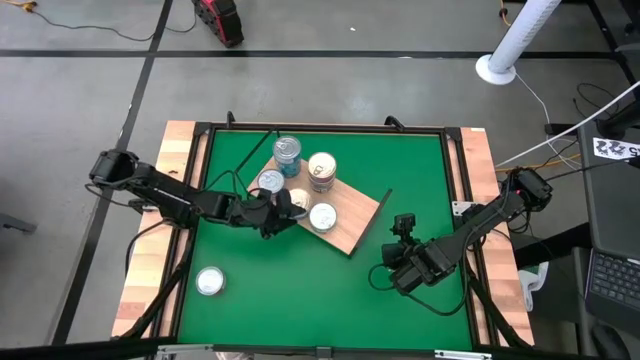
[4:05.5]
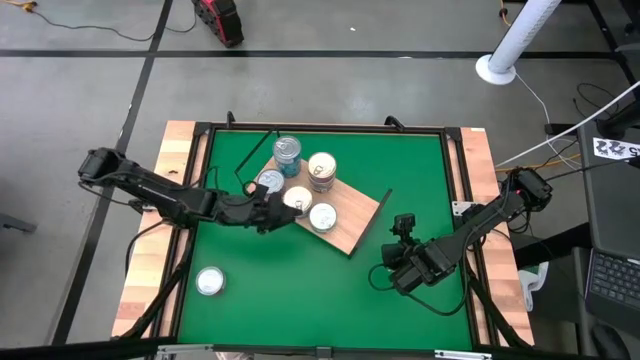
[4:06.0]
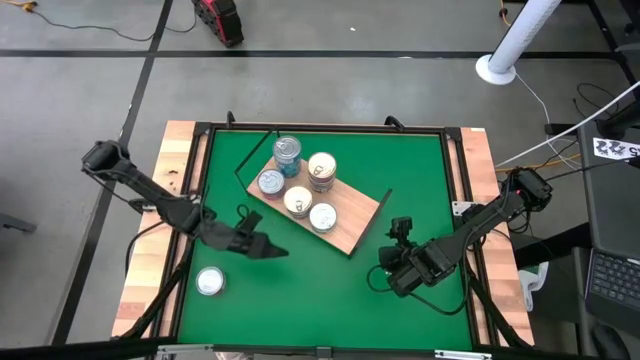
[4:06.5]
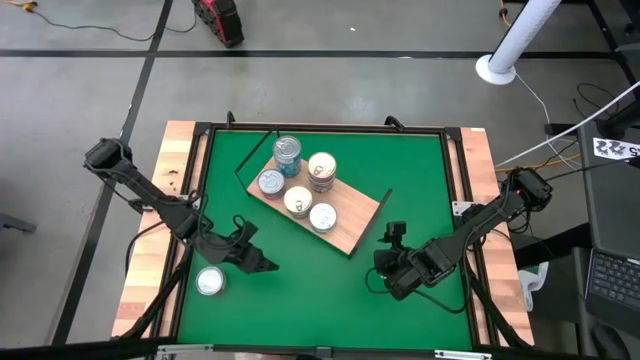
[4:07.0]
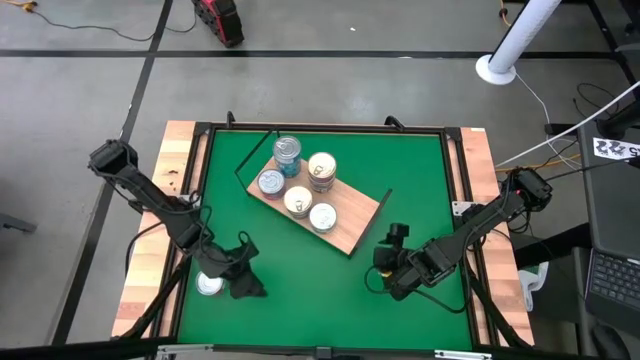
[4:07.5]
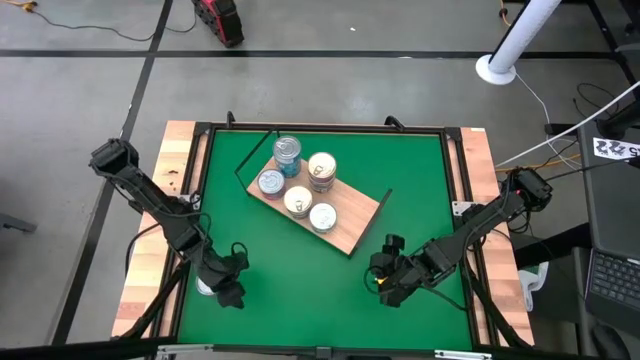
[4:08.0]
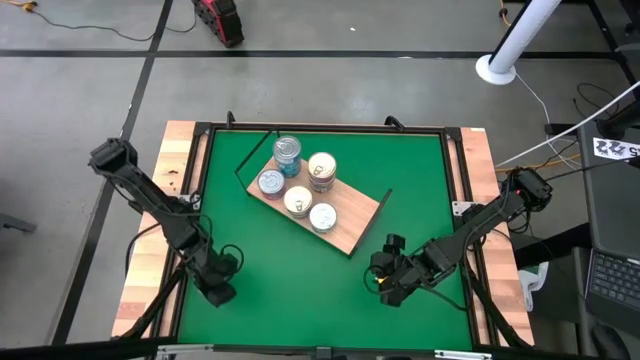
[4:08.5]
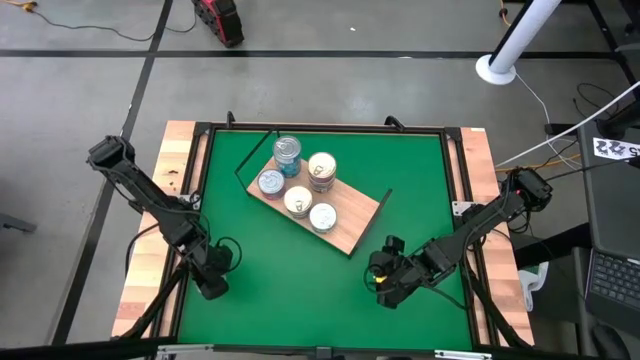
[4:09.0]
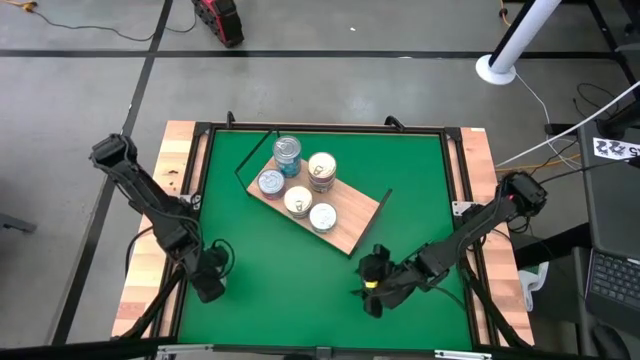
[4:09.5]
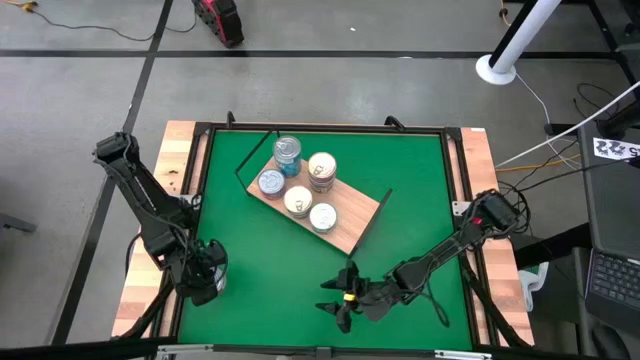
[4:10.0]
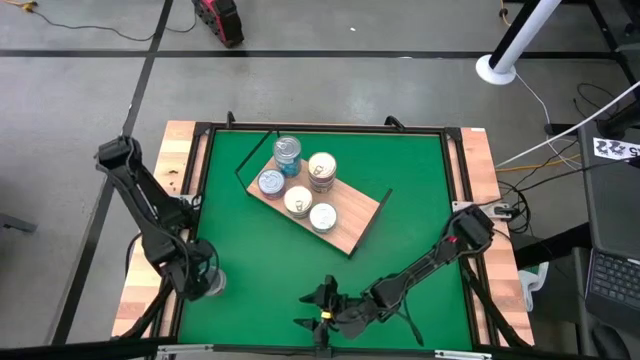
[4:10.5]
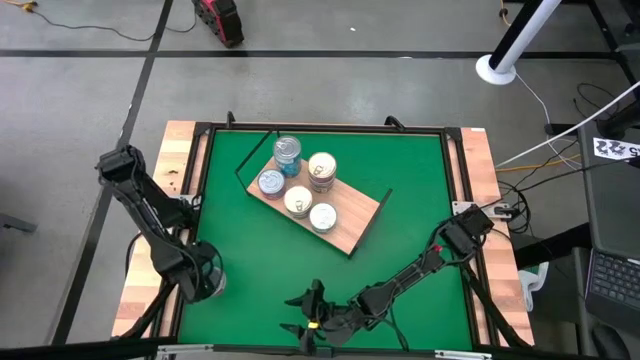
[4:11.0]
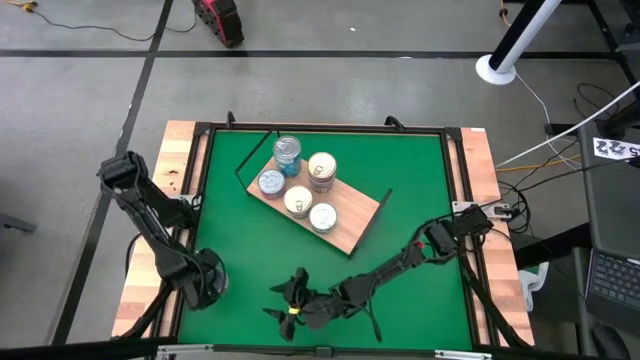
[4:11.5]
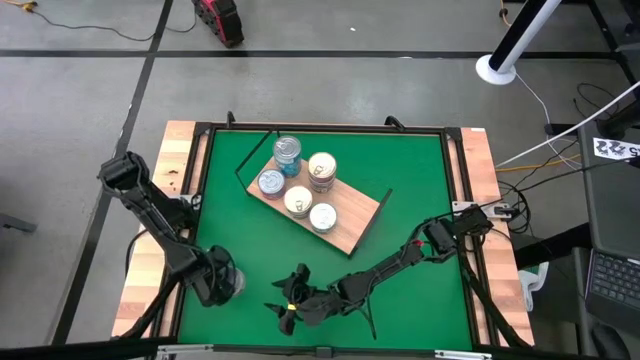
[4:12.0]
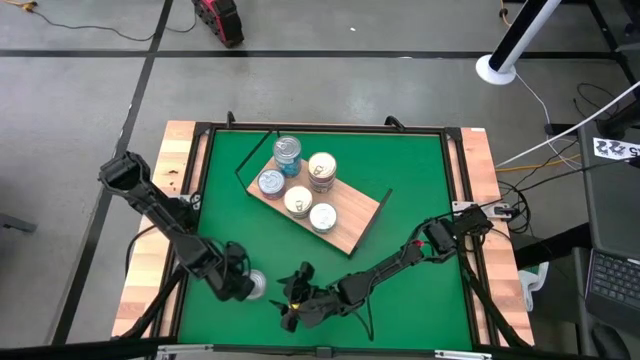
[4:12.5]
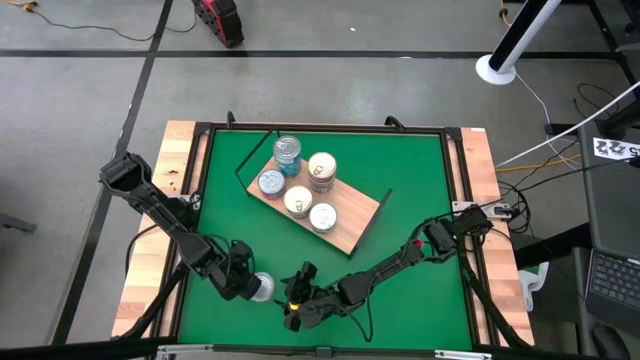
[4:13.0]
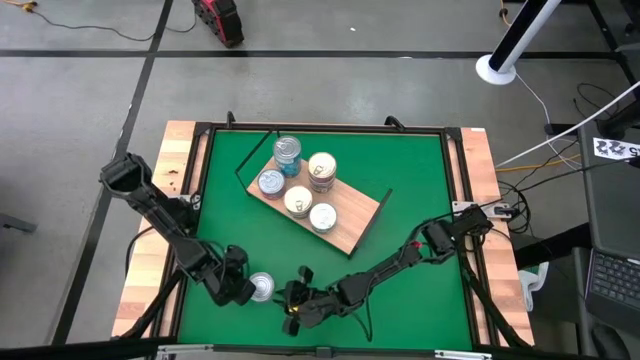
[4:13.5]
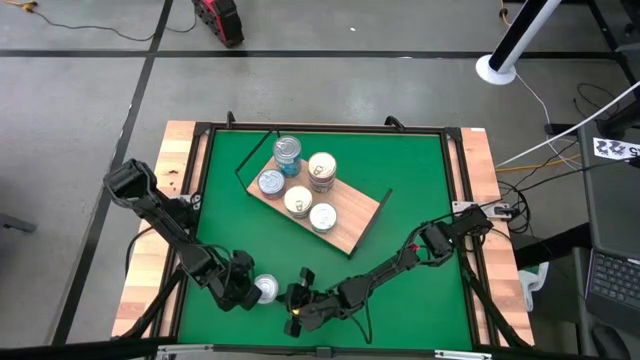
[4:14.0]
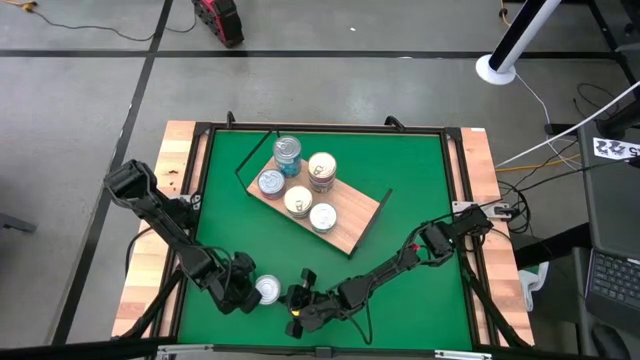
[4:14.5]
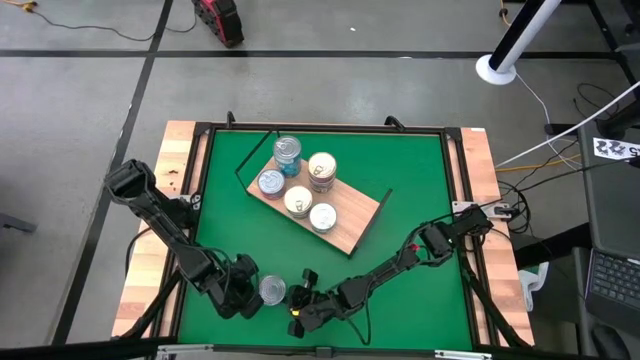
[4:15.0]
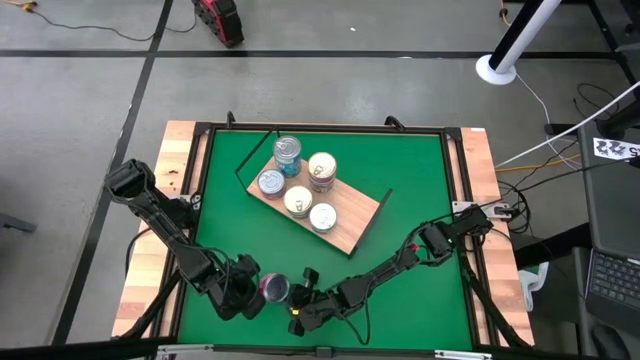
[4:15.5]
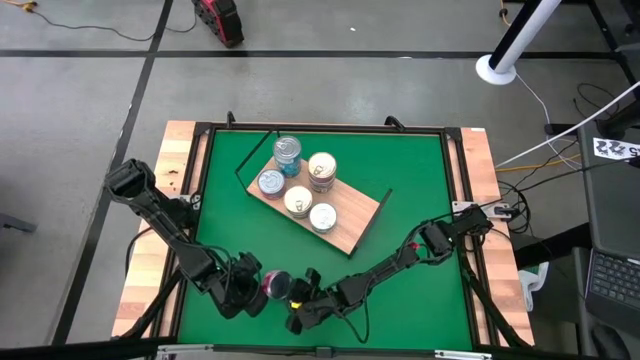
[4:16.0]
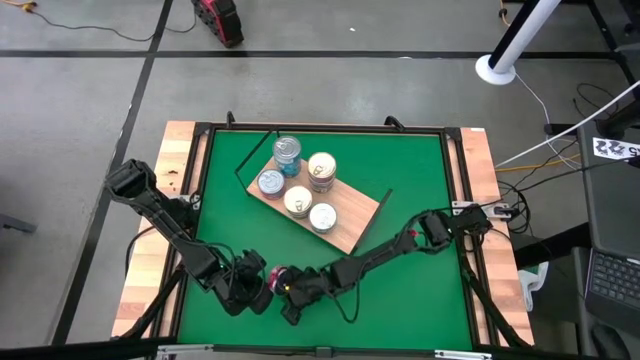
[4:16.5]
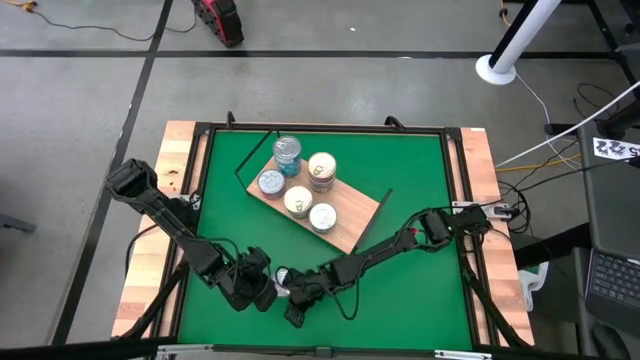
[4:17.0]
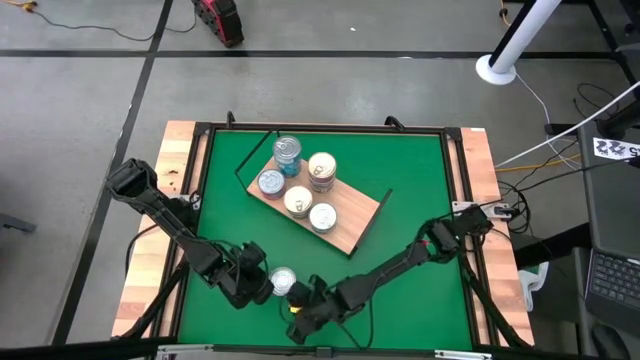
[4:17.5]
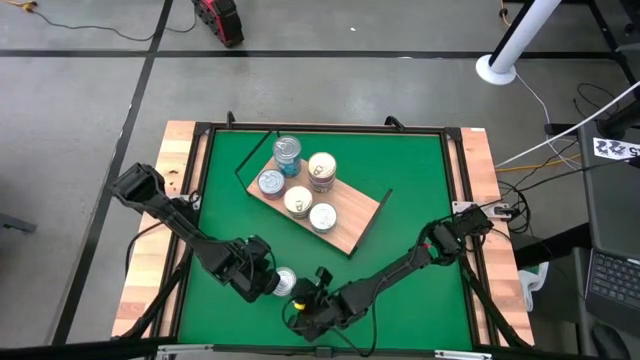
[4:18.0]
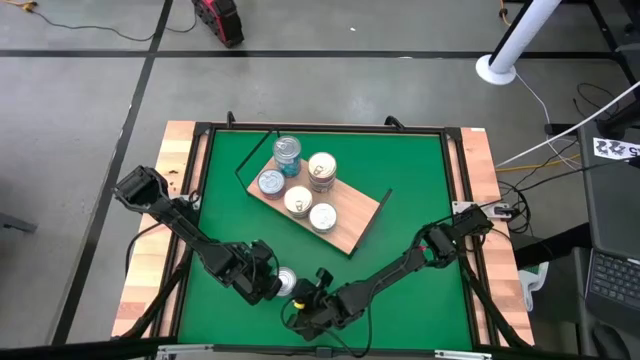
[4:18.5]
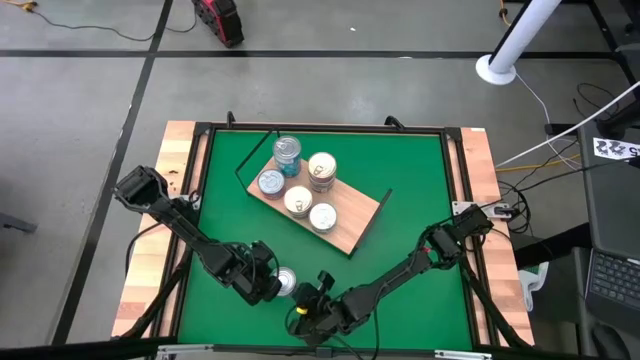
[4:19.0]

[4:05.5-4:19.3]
Task: Stack canned seafood by type on shelf
Stack the blue and pink tuna can on top of the blue and pink tuna can on the shelf

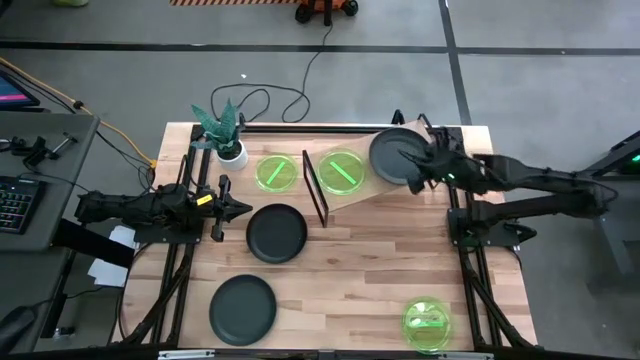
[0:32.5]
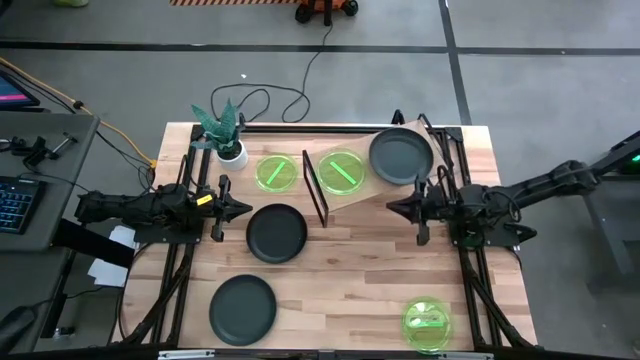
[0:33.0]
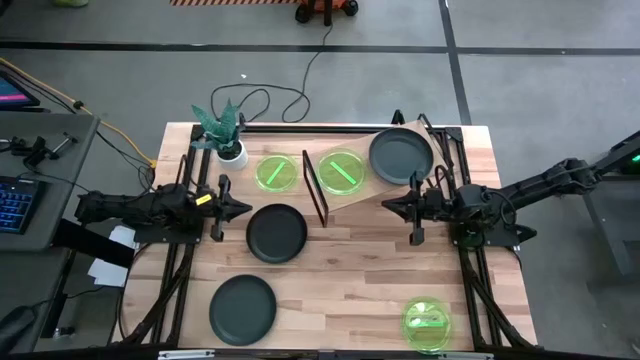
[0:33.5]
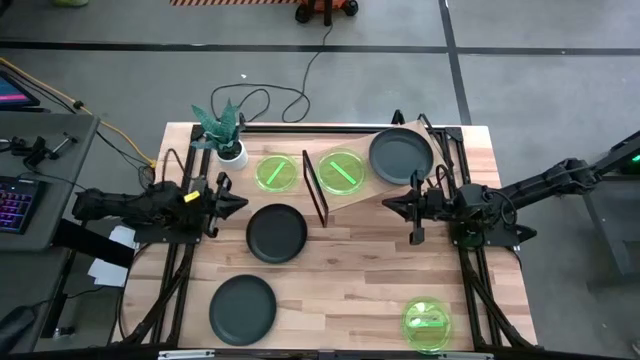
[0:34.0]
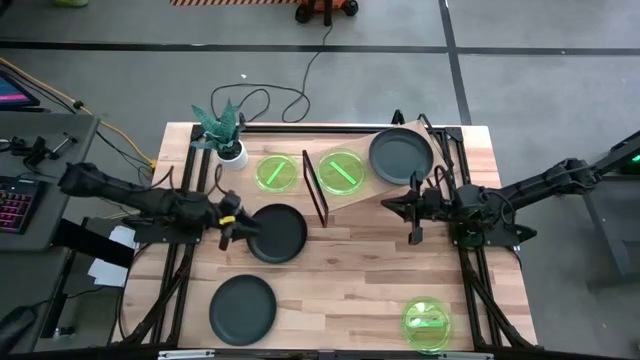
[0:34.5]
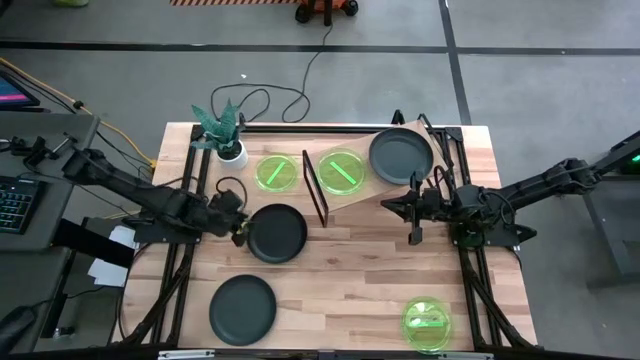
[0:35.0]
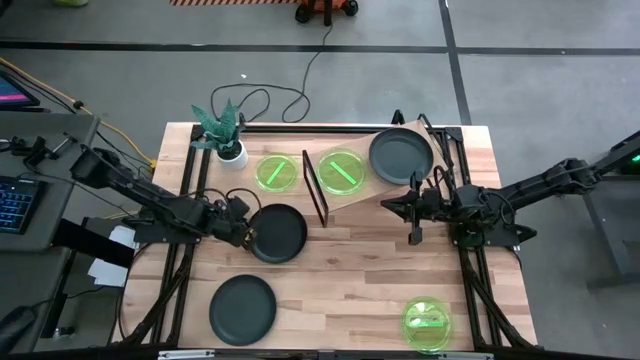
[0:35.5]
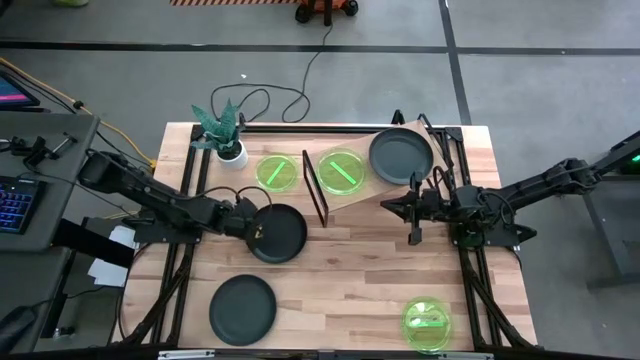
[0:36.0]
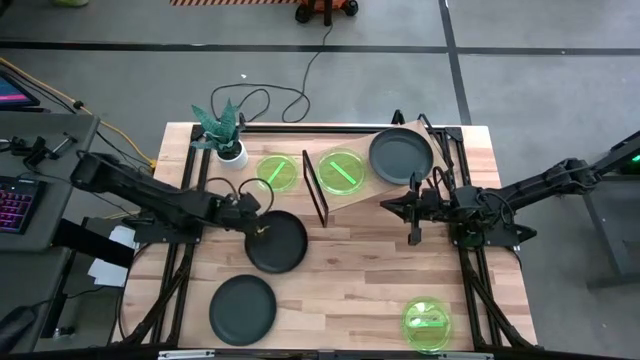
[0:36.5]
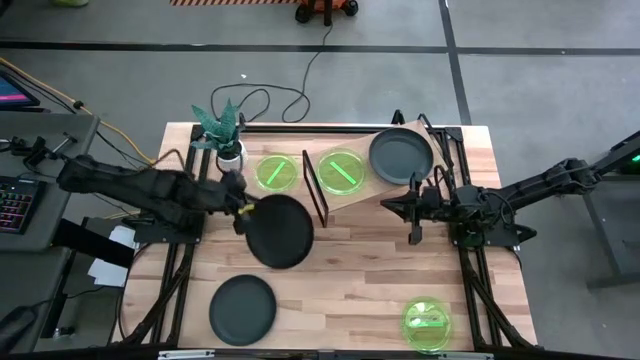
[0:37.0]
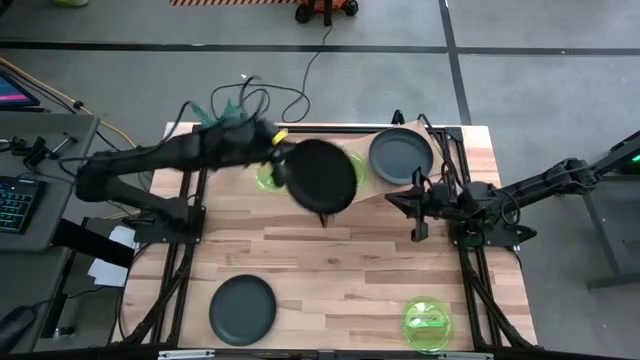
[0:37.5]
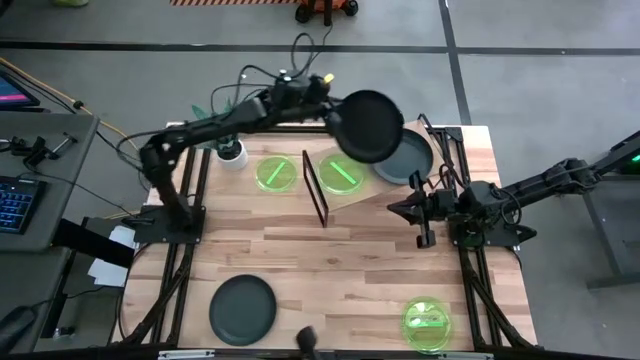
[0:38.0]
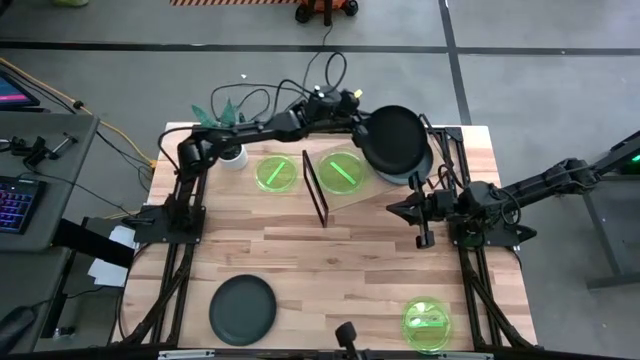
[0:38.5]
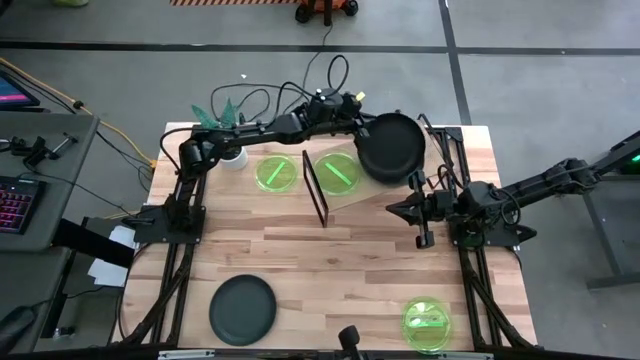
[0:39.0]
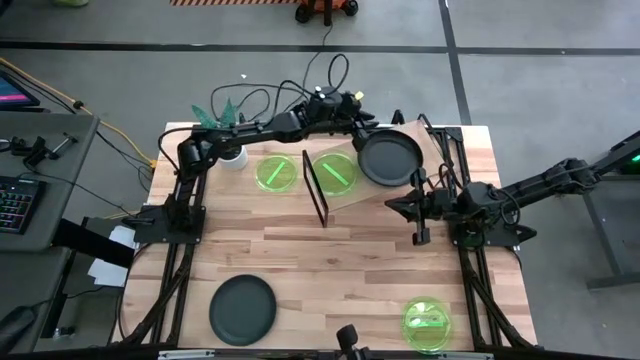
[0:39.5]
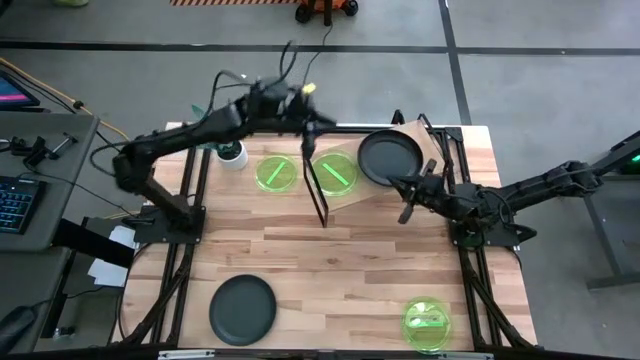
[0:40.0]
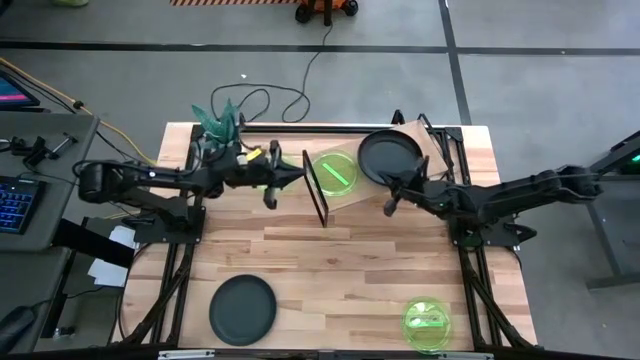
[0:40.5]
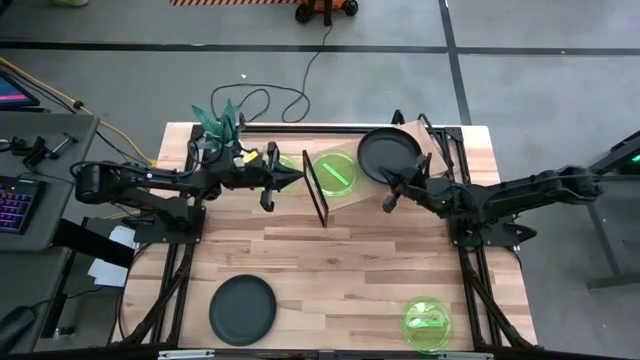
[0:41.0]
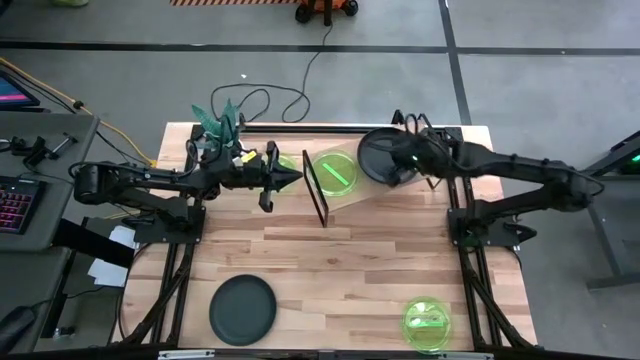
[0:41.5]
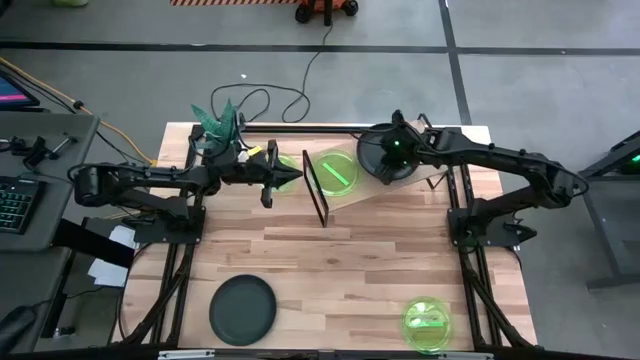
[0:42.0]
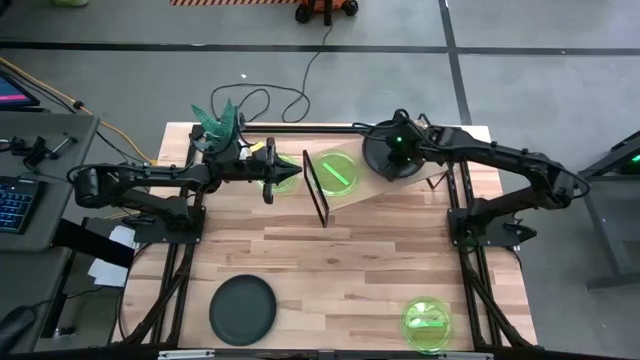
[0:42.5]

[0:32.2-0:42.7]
Task: Place and stack plates onto a shelf
Stack the top black plate on the black plate on the shelf
